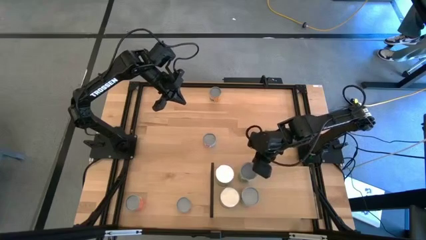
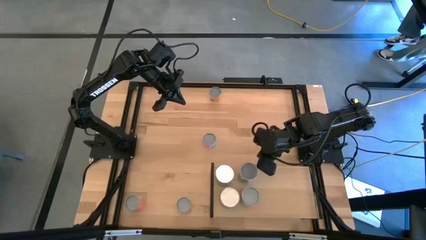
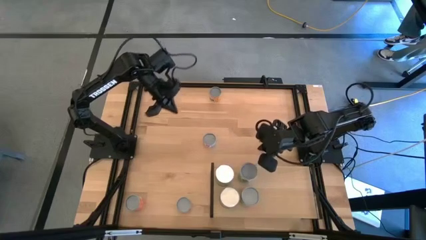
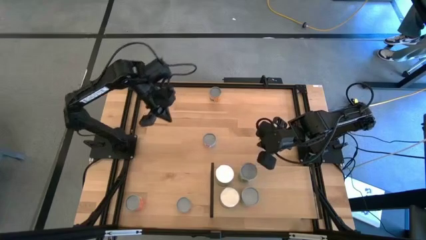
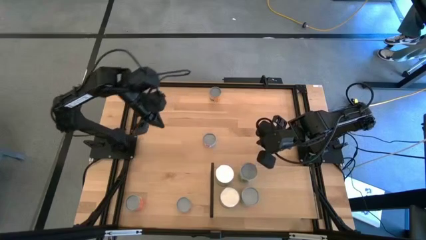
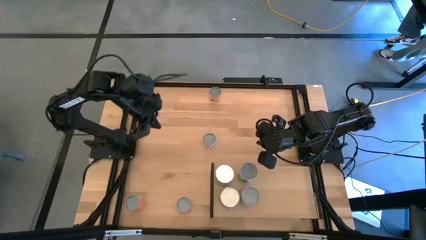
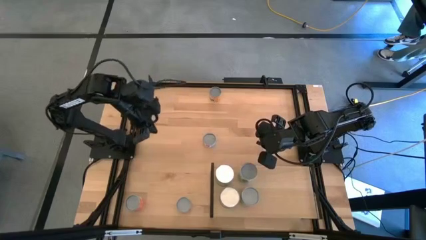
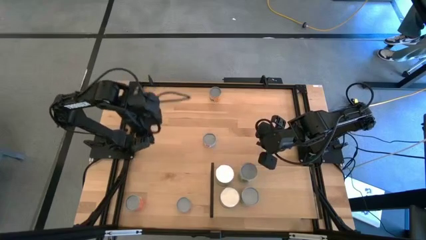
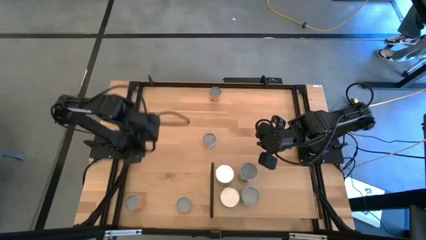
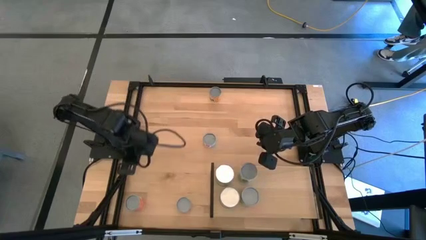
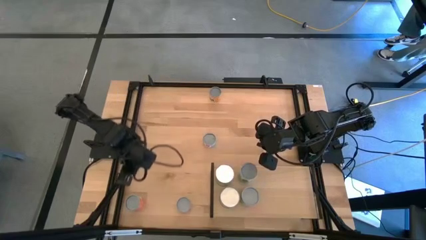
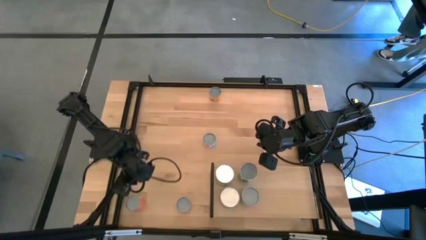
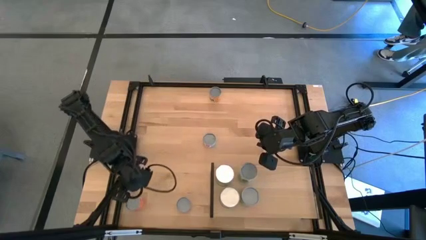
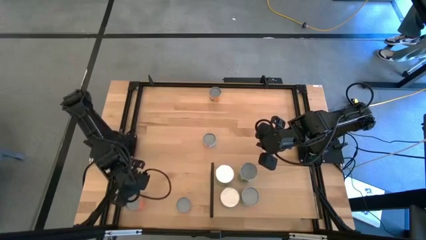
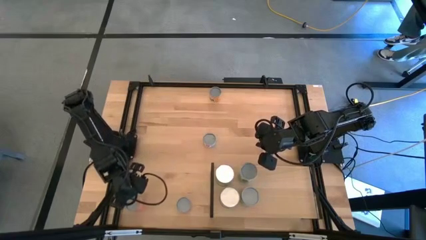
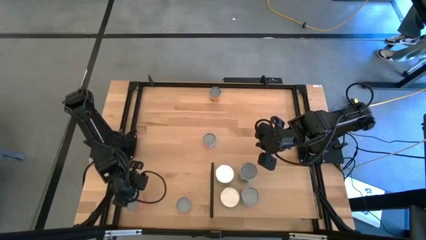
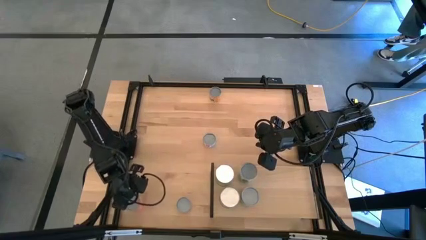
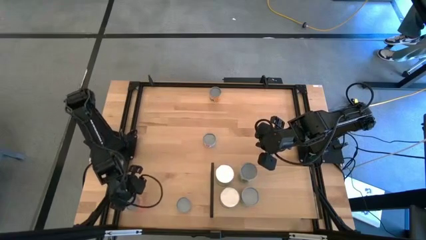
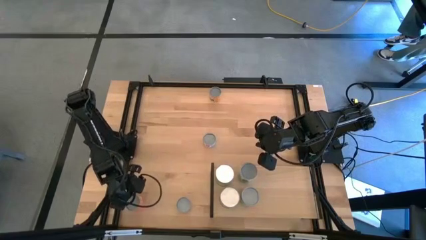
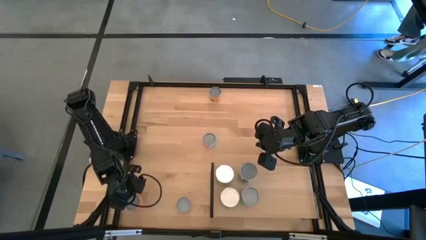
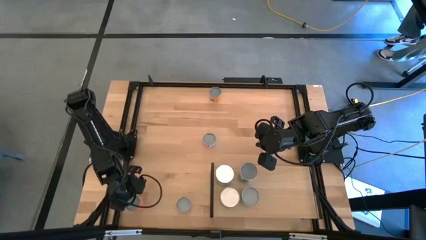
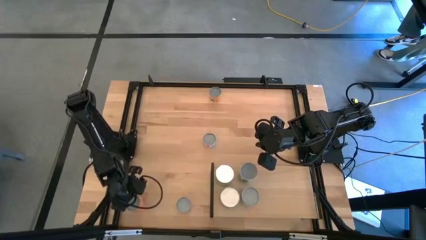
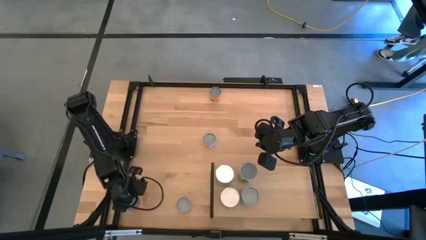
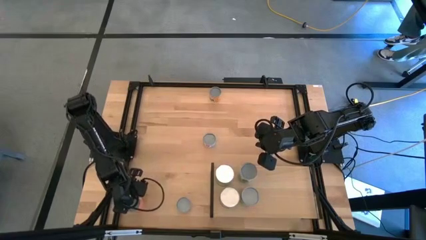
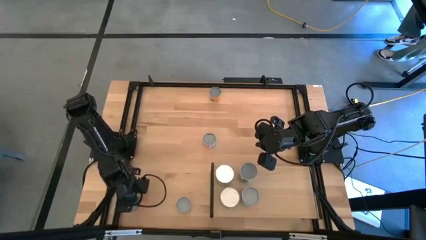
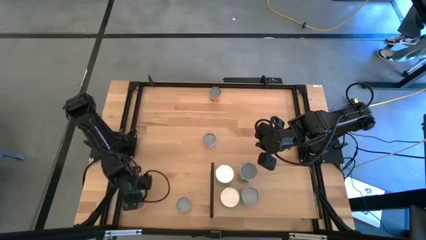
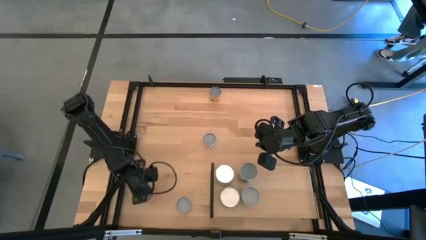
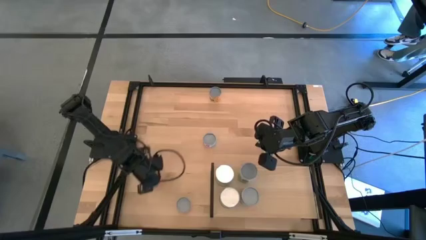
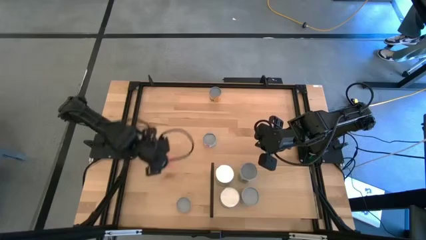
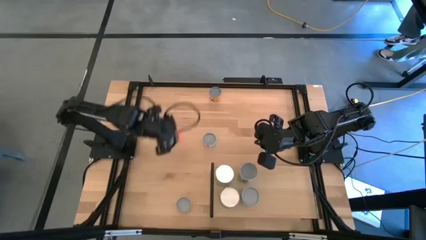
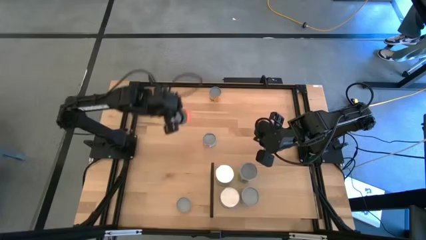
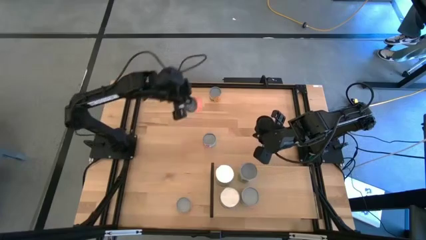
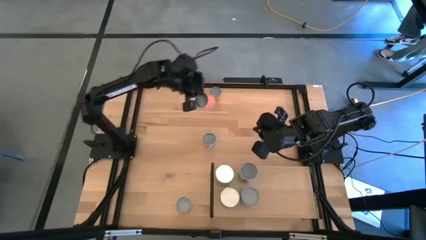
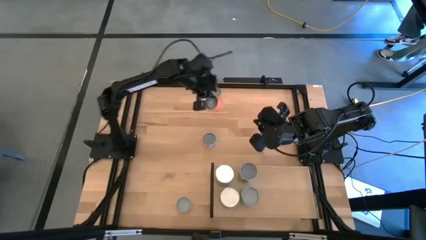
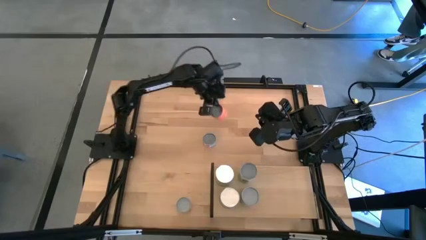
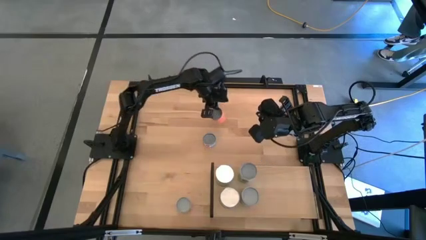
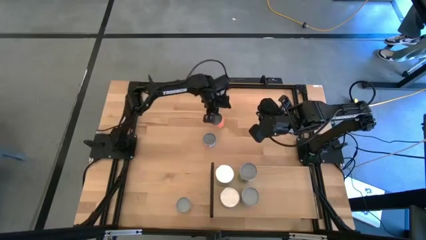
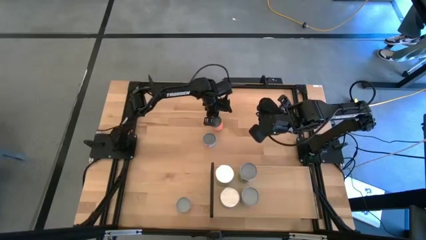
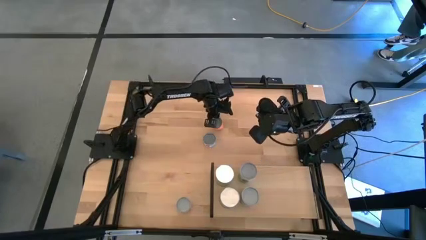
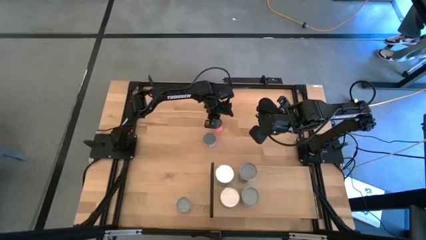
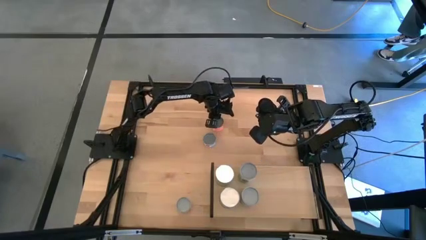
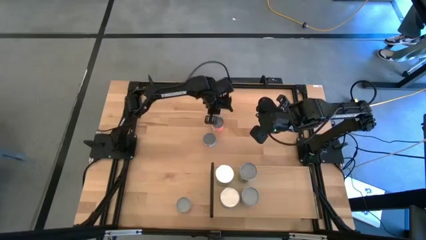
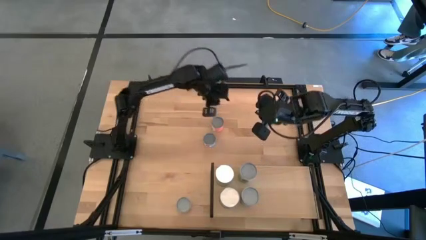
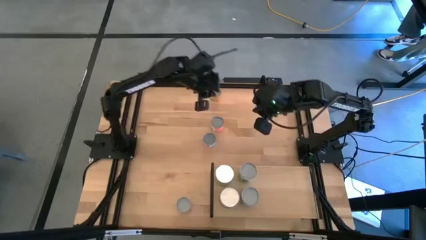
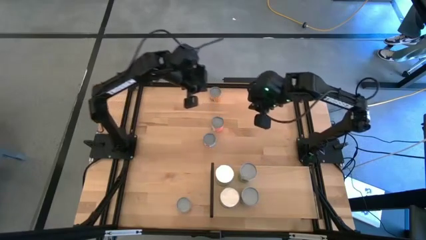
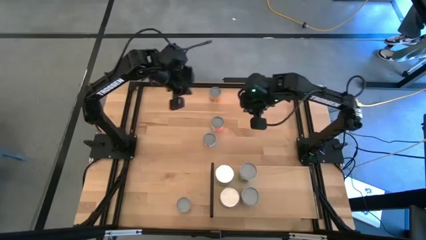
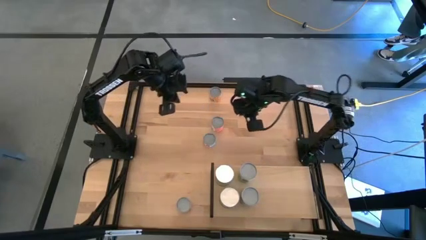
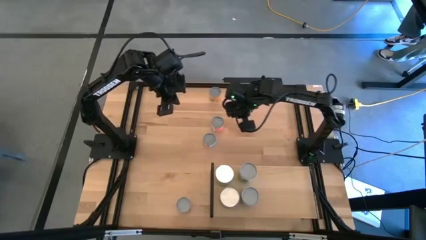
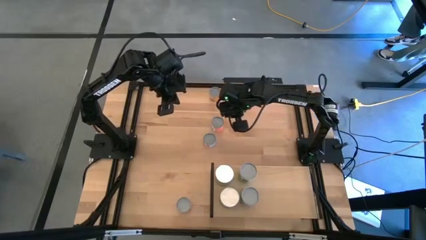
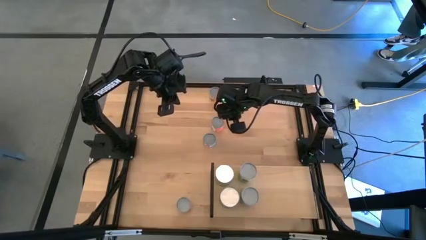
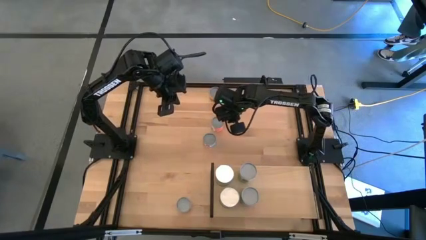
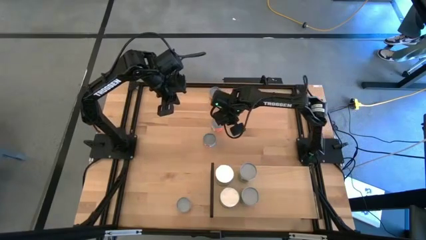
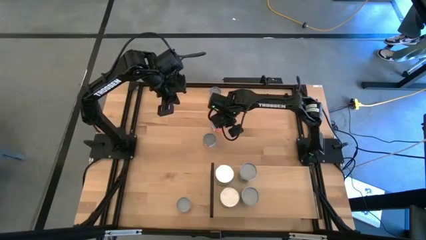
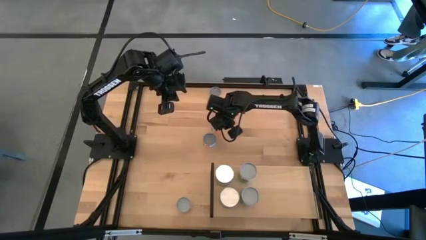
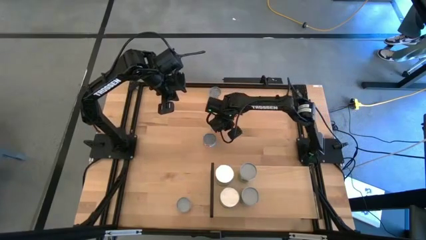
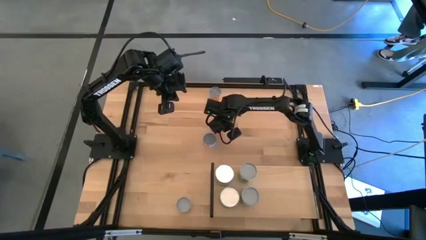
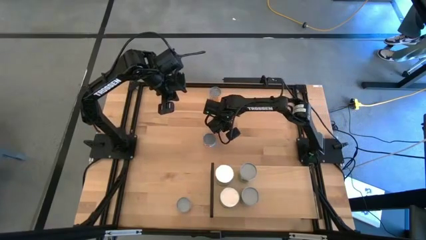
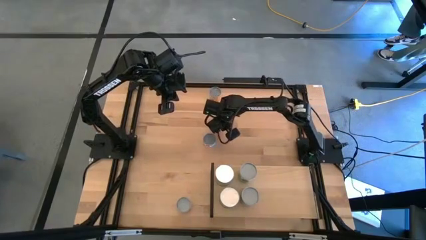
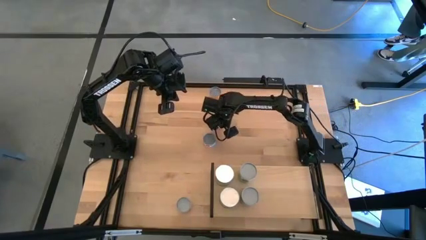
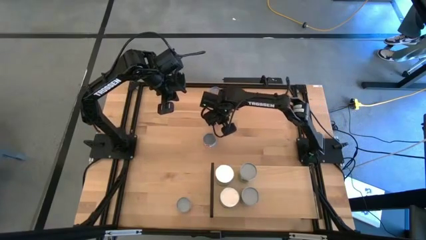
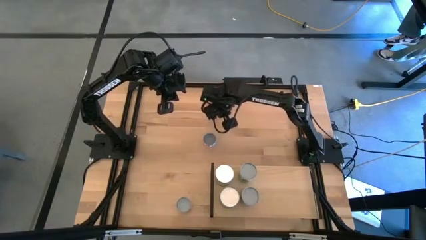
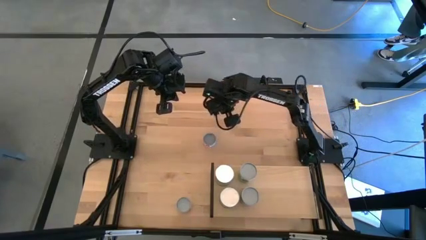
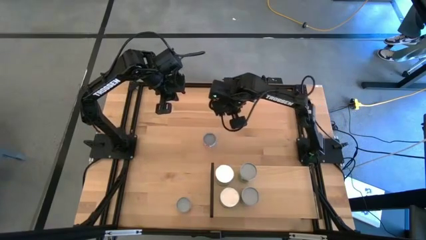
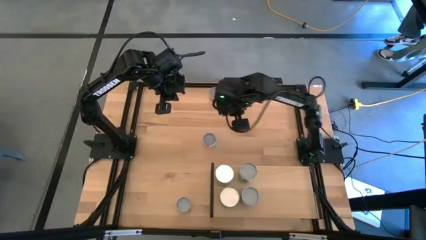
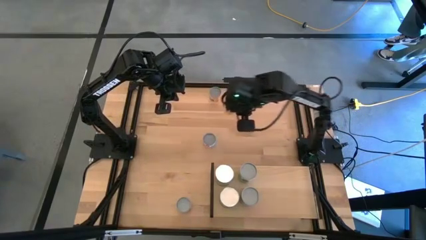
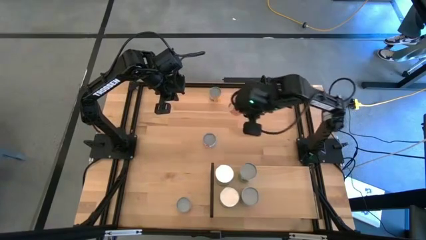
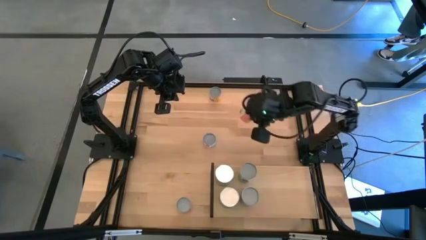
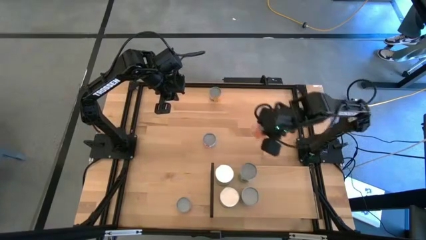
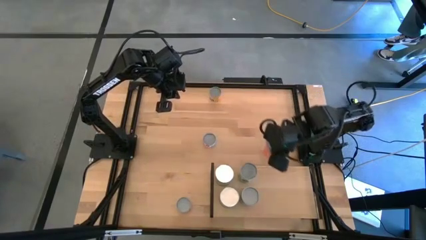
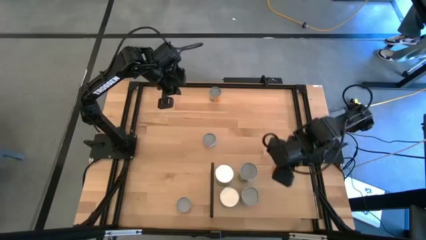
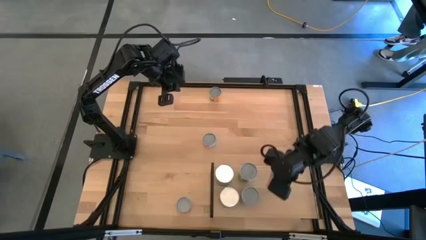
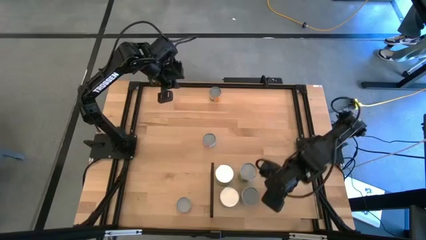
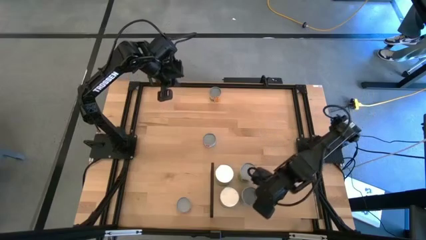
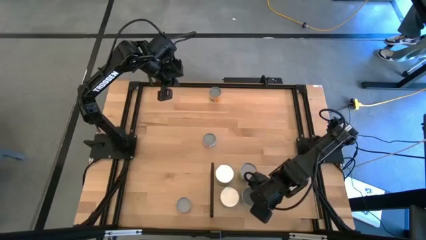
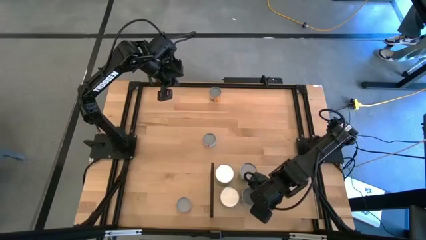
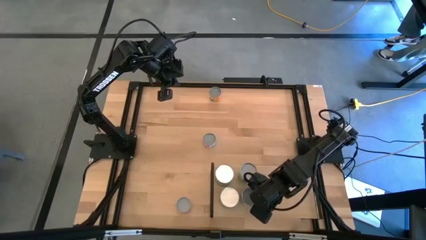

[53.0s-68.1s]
Task: Pick and place cans onto a shelf
Put the canned oranges on the shelf
